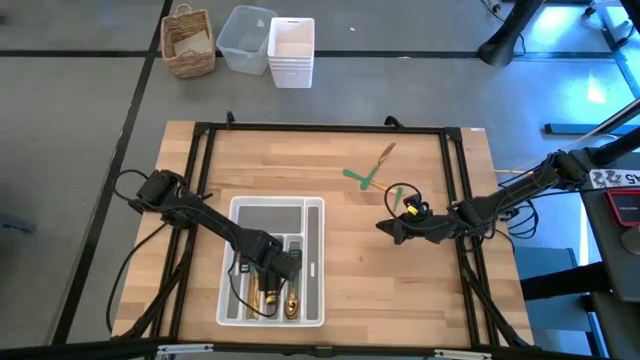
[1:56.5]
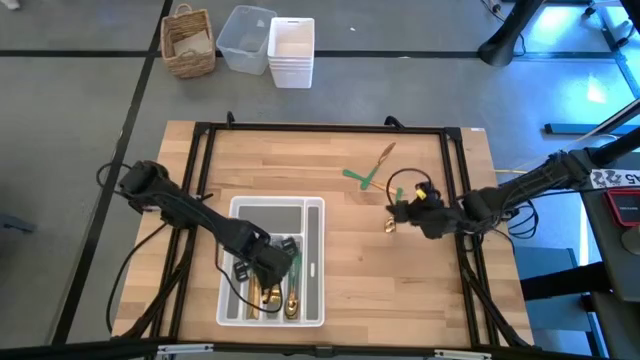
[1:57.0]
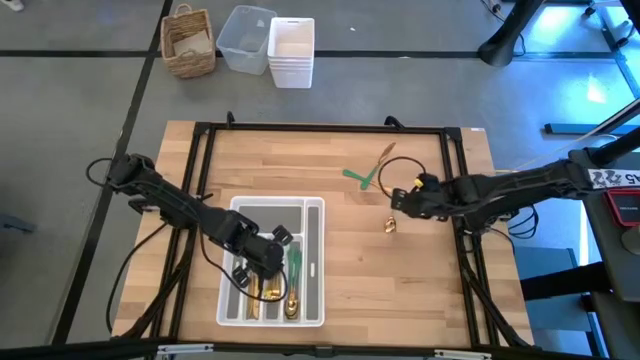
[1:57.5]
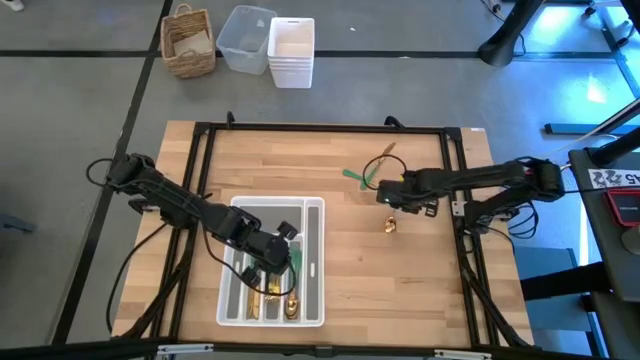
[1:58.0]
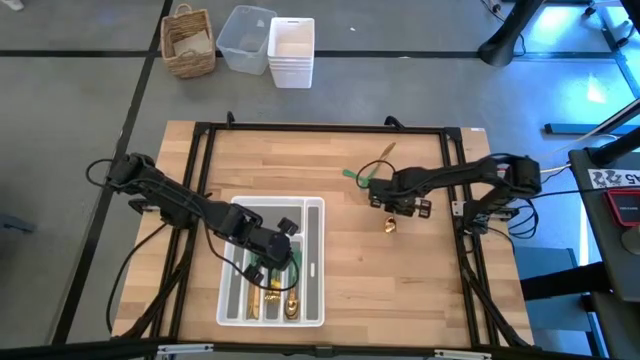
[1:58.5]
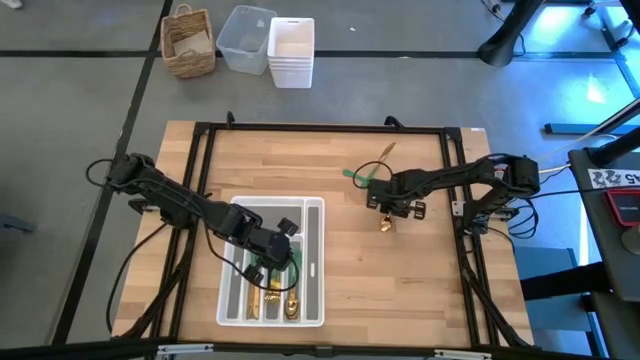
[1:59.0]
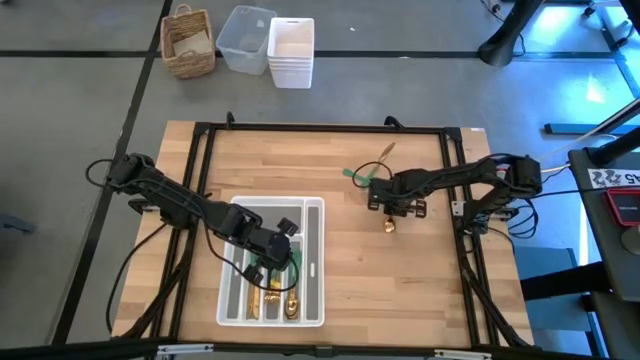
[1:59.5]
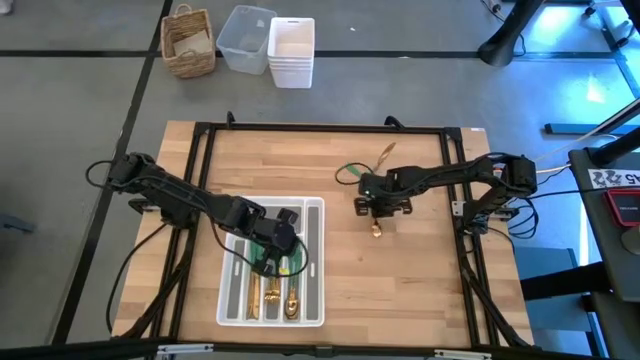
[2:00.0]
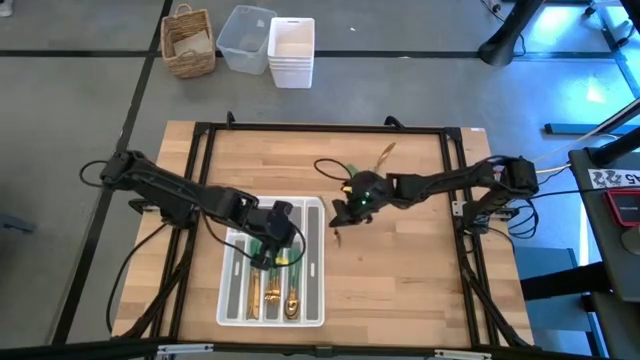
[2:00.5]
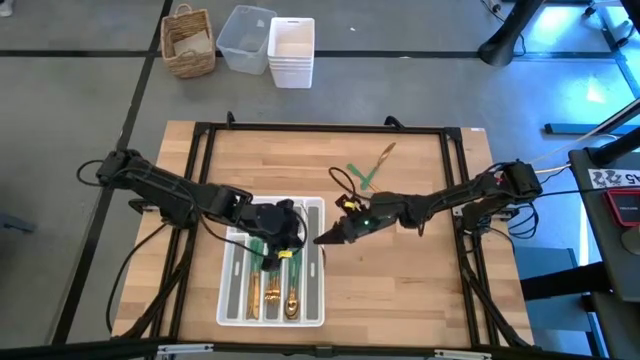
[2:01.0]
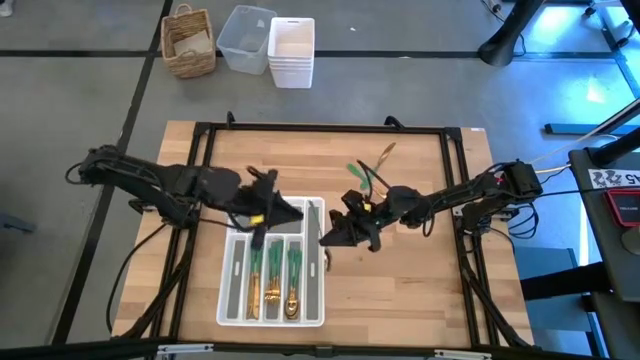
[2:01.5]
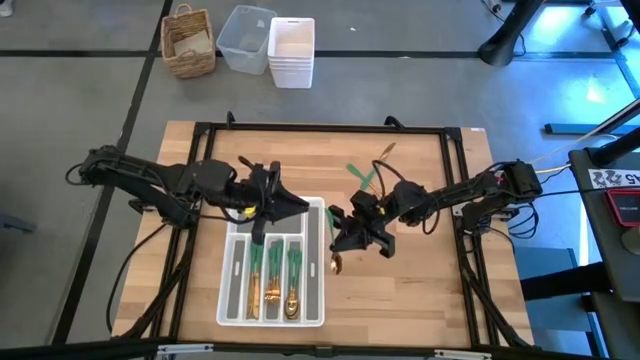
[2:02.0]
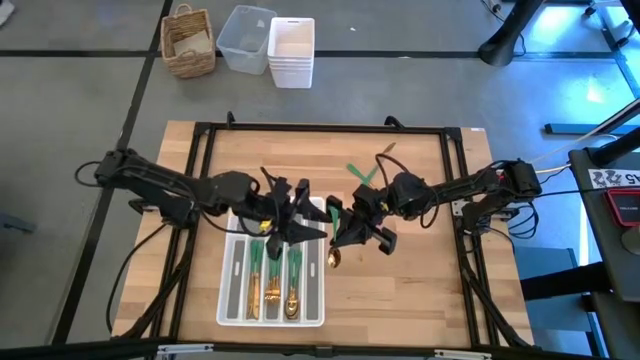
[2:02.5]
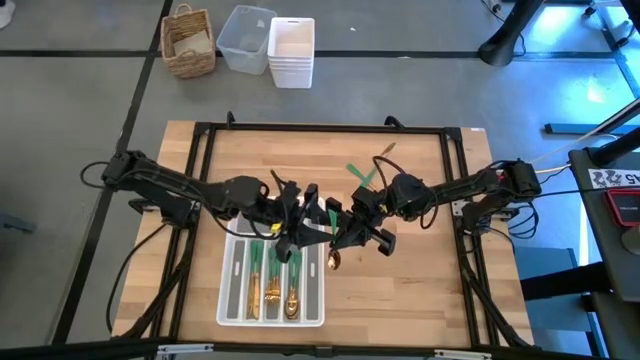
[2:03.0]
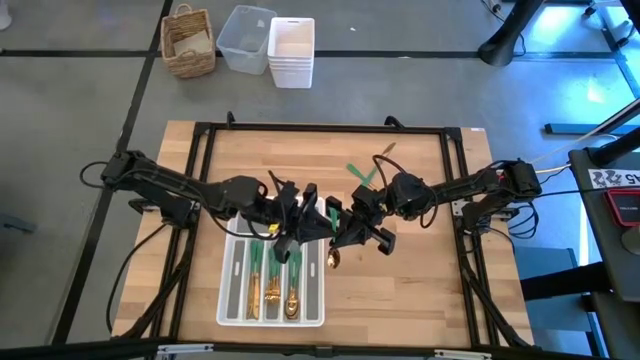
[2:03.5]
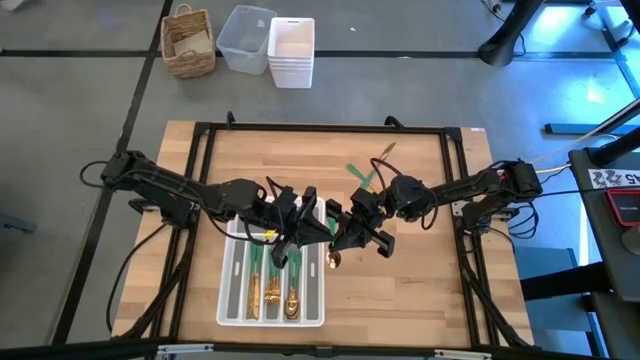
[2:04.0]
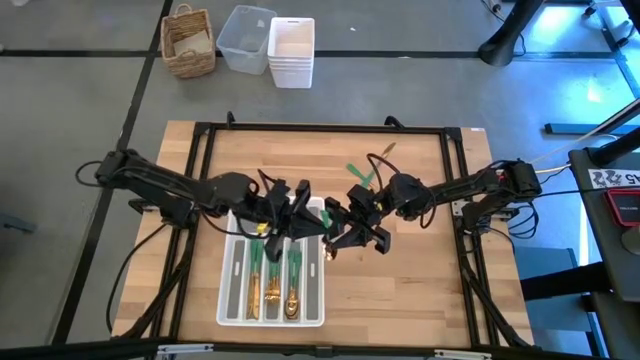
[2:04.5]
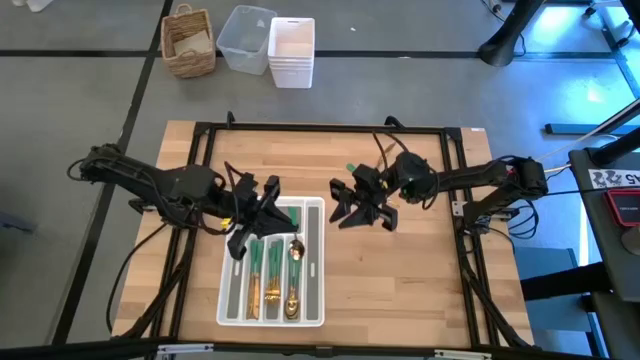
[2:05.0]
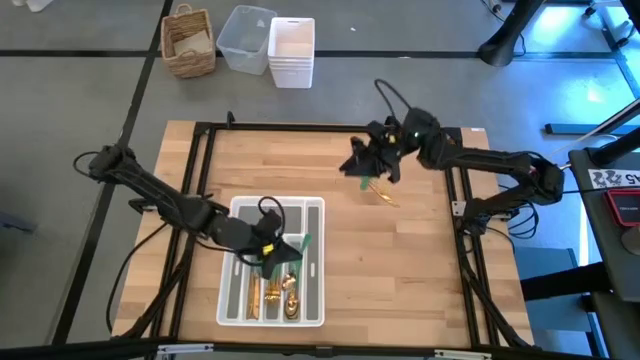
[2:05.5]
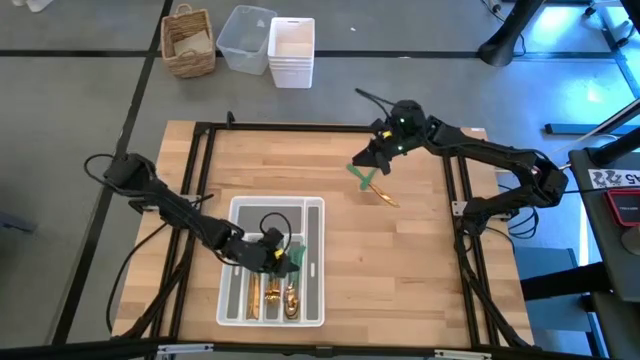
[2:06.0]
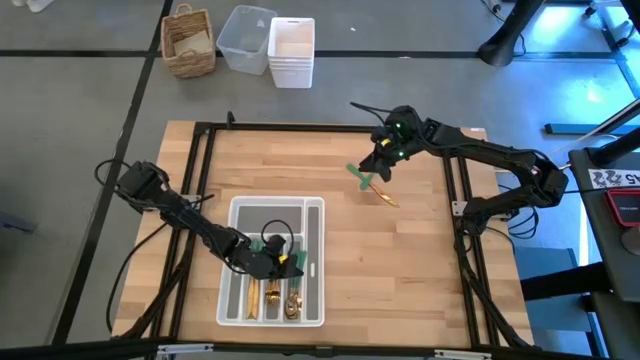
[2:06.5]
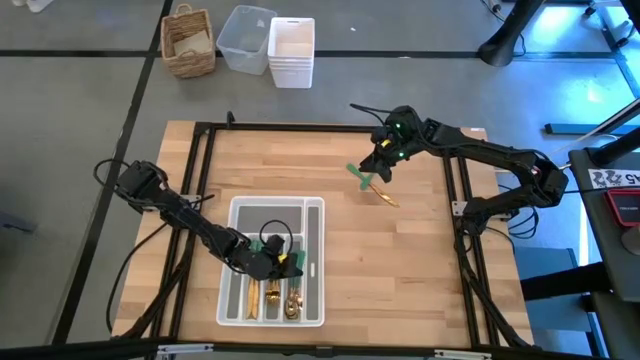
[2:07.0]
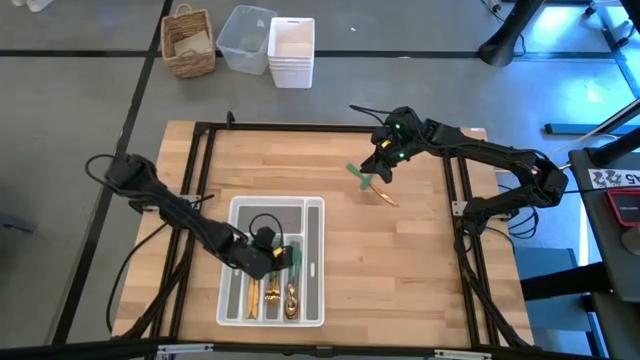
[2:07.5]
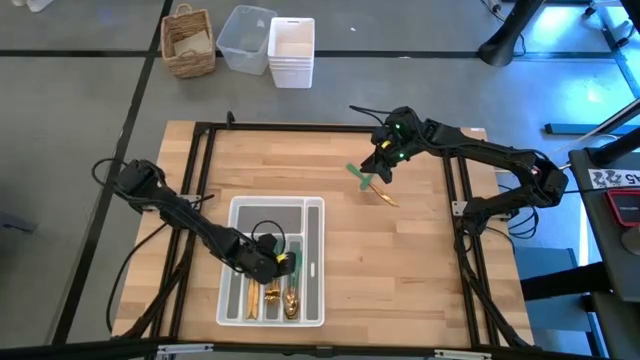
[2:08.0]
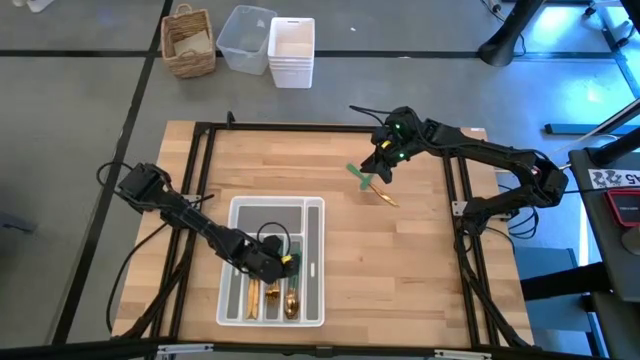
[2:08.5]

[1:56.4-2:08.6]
Task: Sort silverware
Put the spoon in the silverware tray

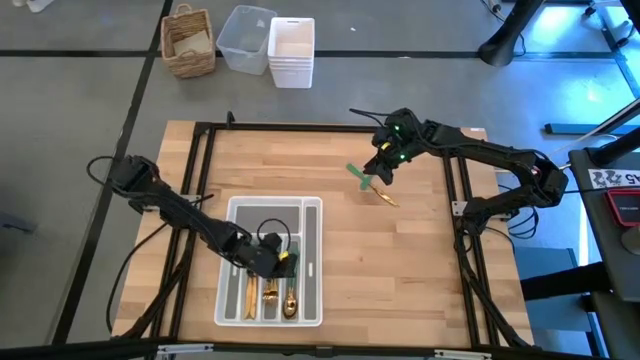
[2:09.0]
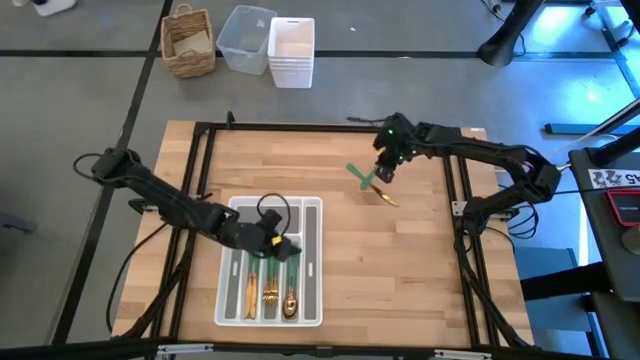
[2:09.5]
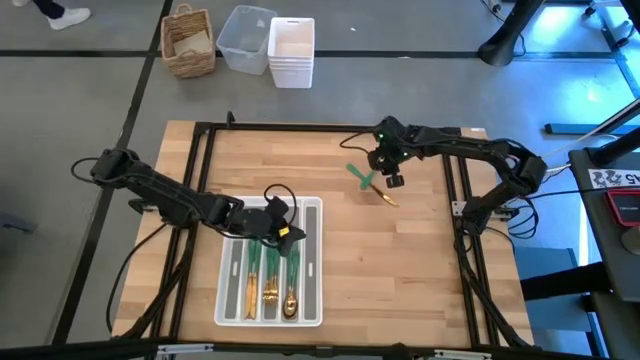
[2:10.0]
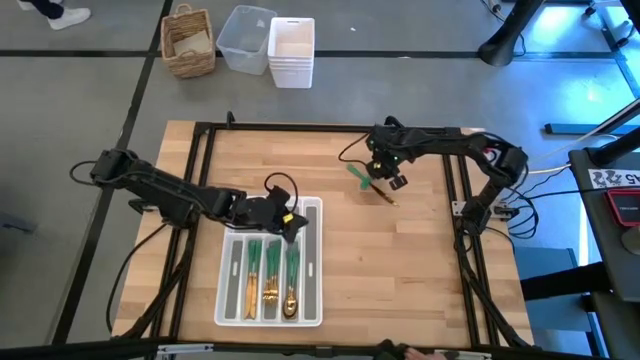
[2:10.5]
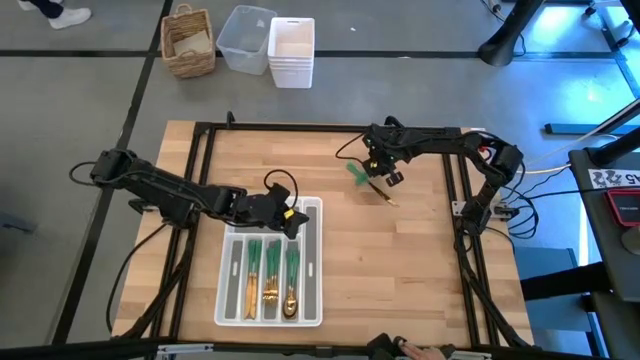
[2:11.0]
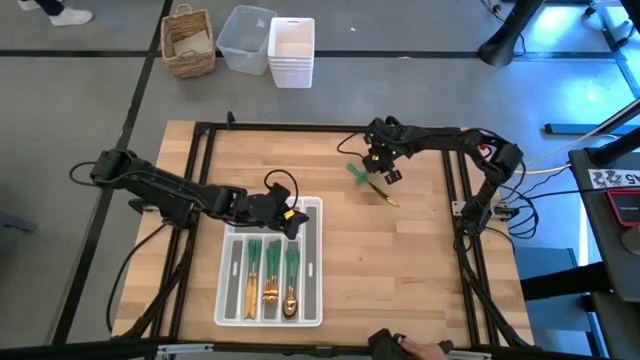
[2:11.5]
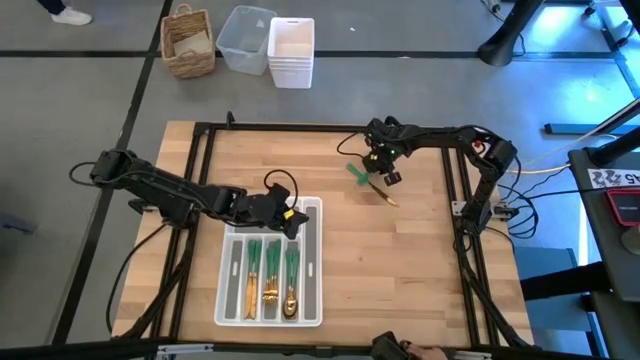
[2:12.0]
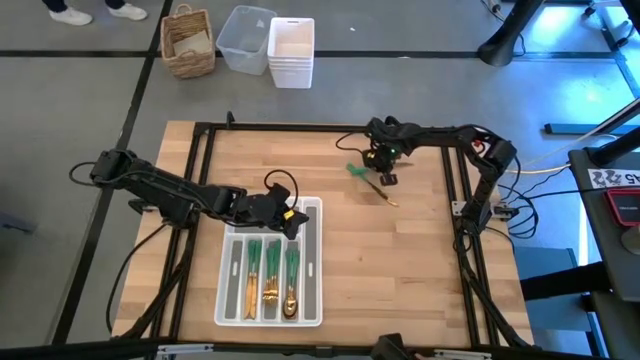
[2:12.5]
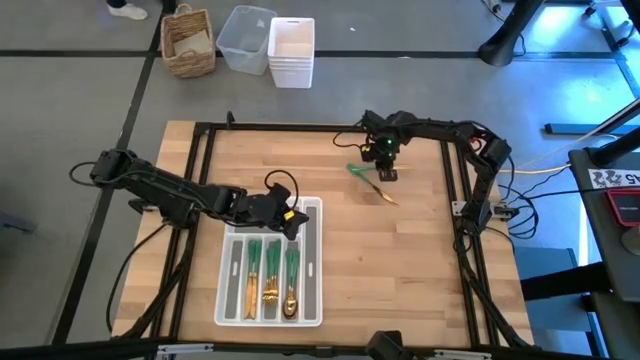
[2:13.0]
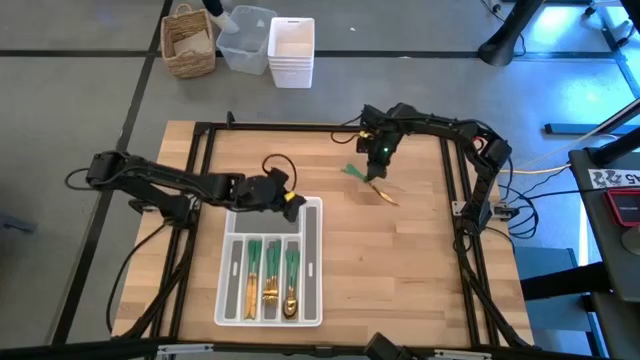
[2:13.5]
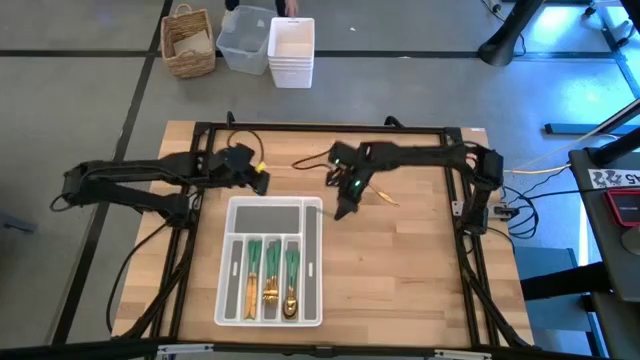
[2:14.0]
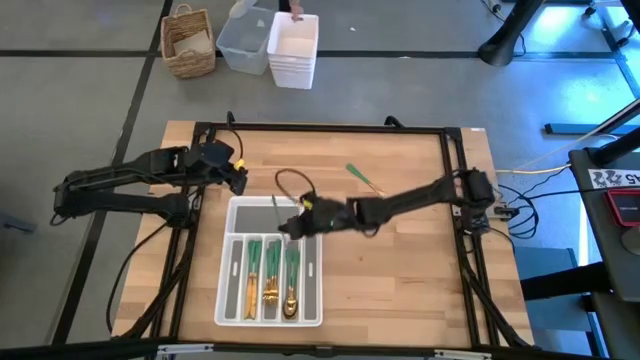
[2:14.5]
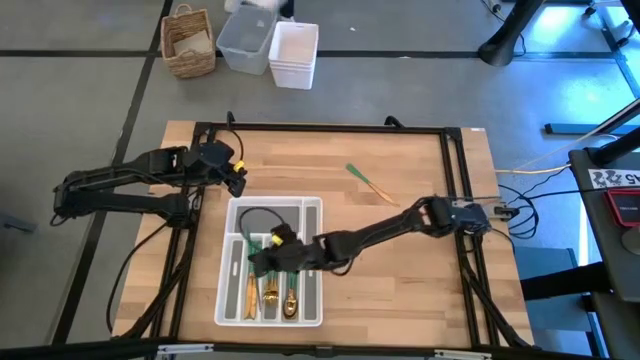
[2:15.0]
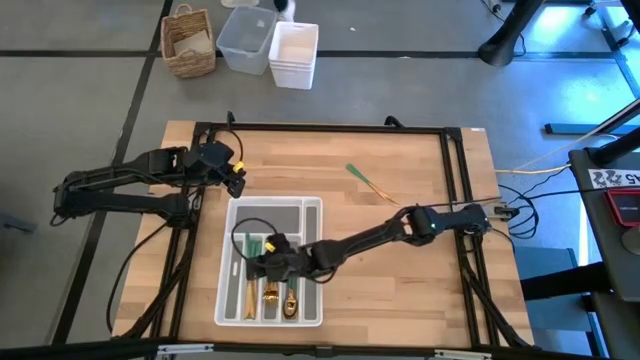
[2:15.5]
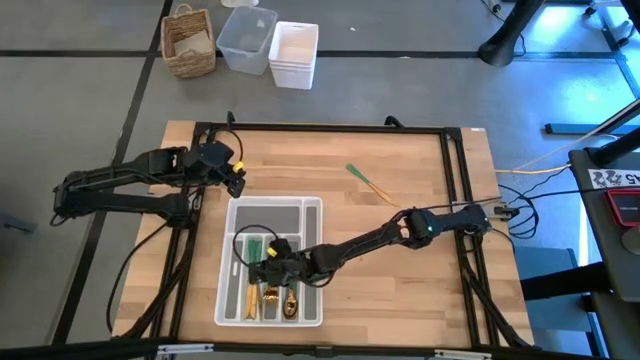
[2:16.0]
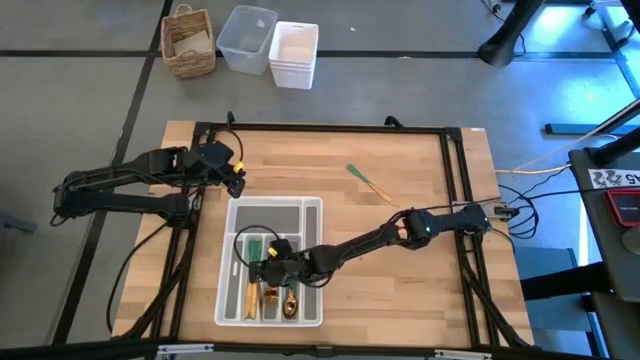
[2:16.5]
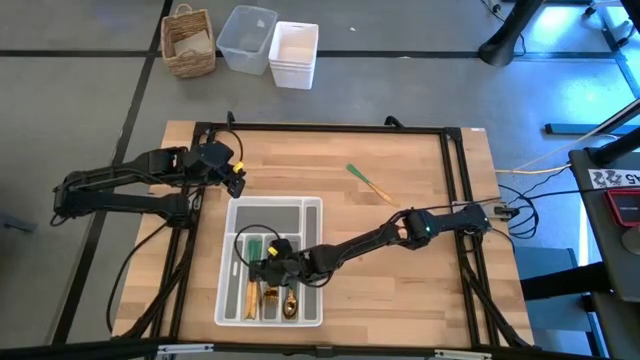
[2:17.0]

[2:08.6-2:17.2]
Put the table knife in the silverware tray
